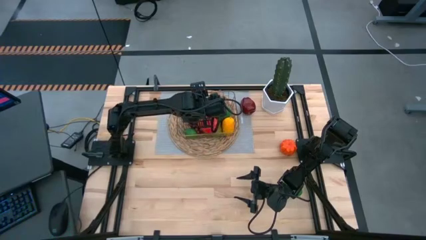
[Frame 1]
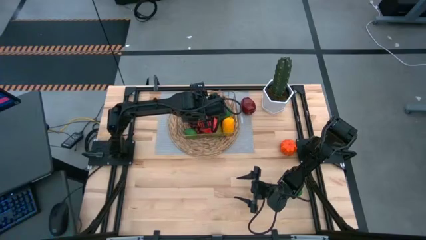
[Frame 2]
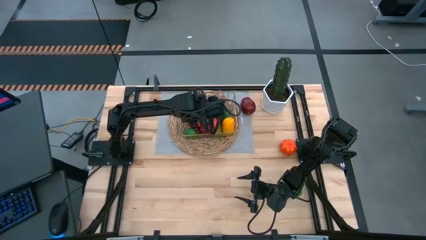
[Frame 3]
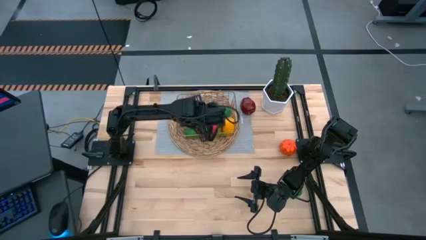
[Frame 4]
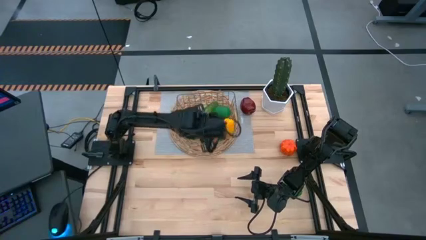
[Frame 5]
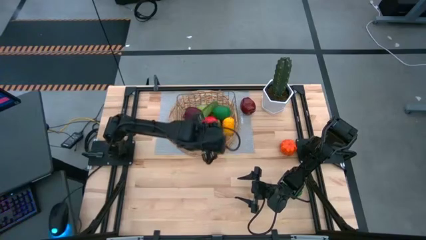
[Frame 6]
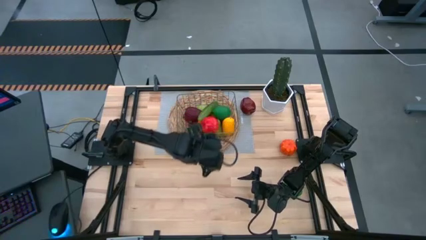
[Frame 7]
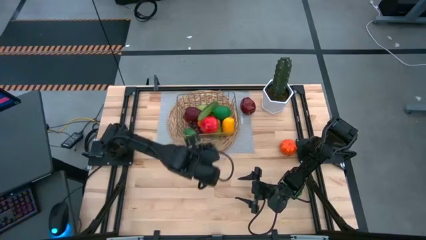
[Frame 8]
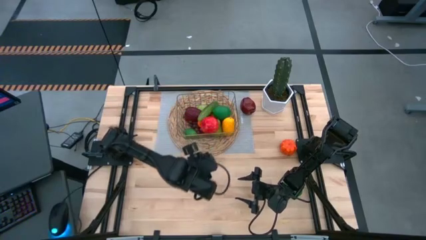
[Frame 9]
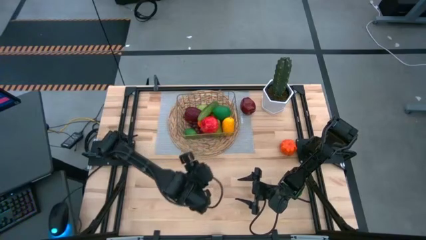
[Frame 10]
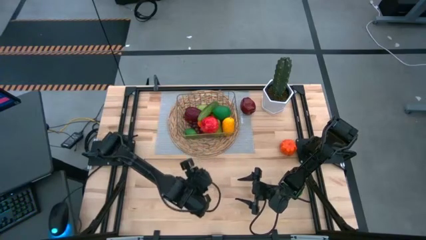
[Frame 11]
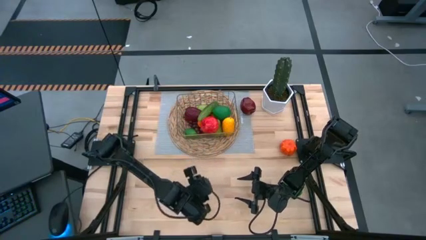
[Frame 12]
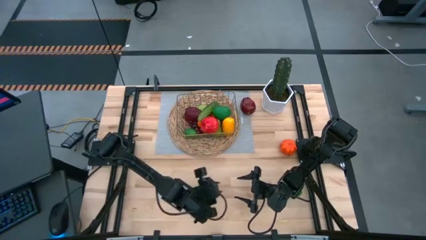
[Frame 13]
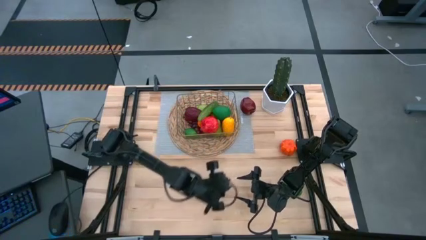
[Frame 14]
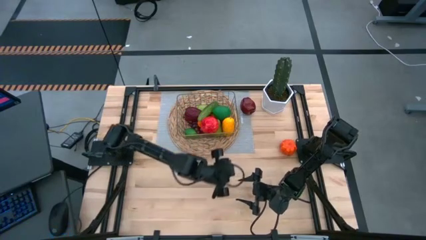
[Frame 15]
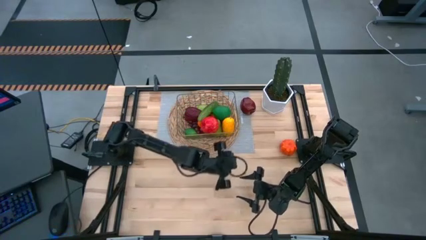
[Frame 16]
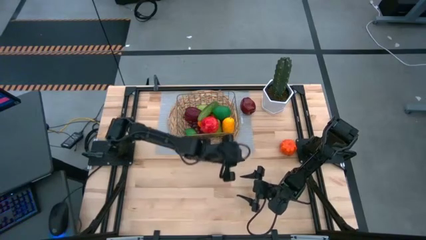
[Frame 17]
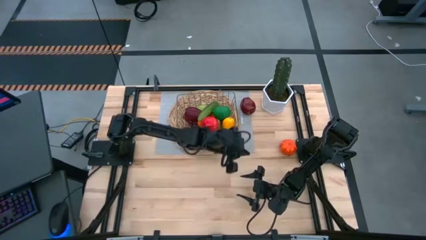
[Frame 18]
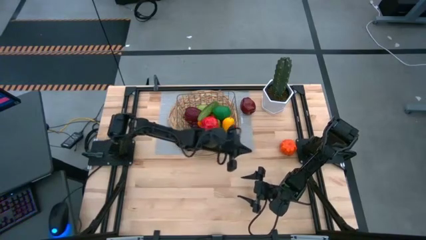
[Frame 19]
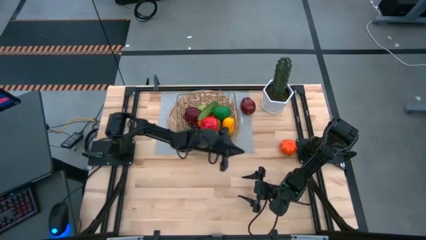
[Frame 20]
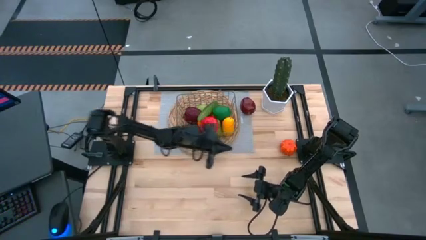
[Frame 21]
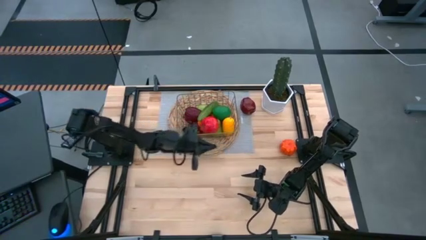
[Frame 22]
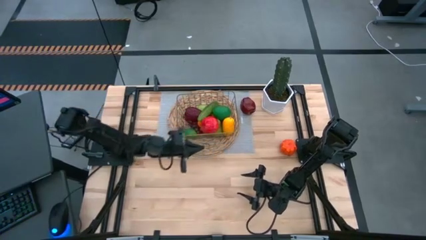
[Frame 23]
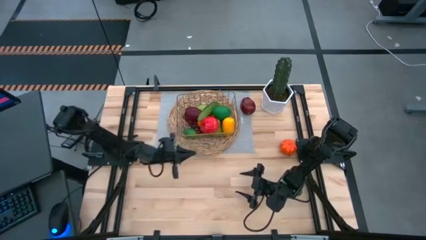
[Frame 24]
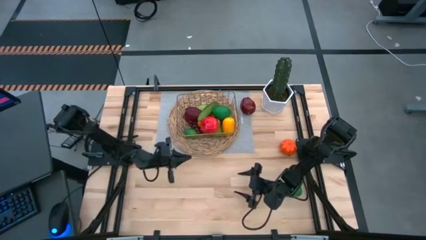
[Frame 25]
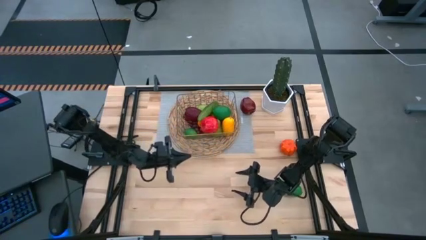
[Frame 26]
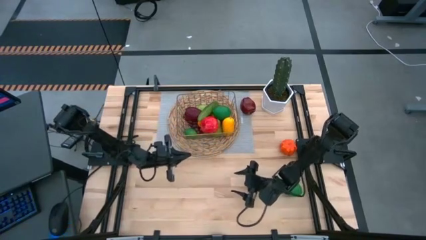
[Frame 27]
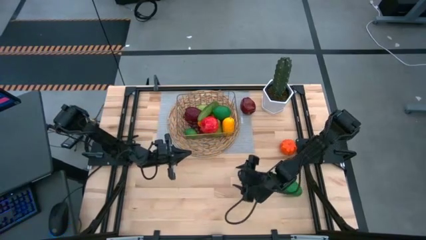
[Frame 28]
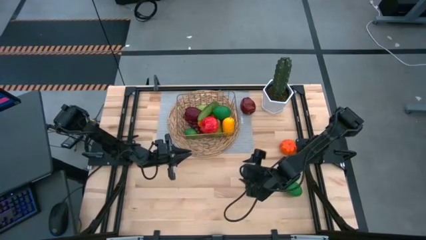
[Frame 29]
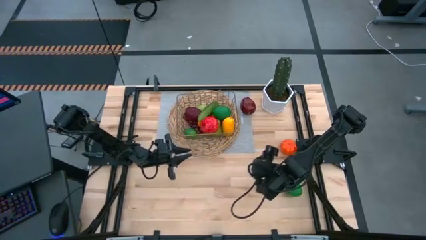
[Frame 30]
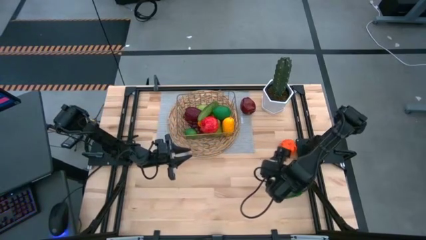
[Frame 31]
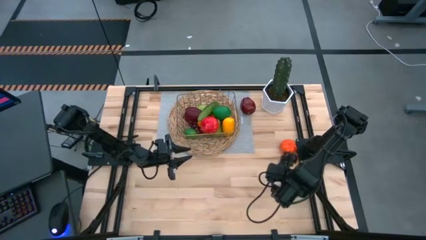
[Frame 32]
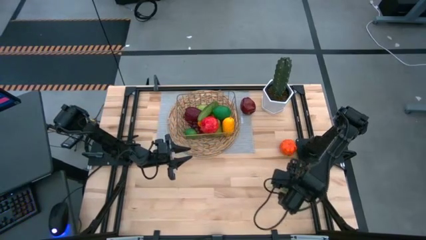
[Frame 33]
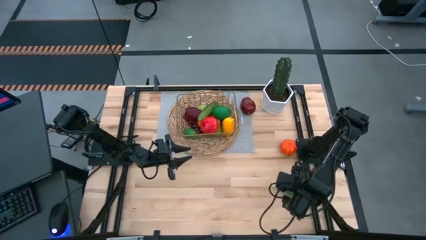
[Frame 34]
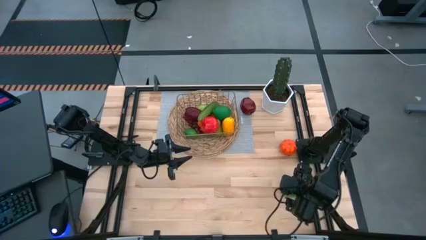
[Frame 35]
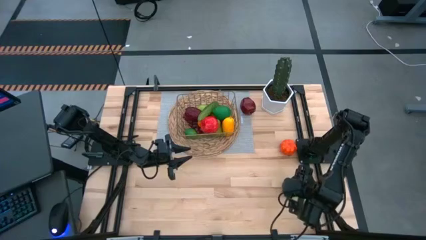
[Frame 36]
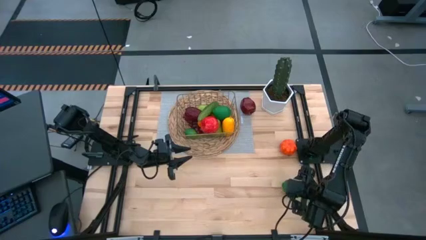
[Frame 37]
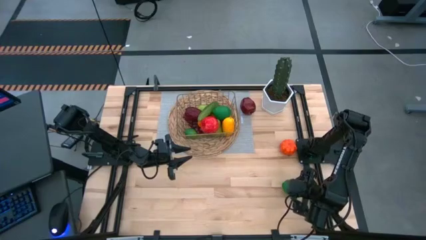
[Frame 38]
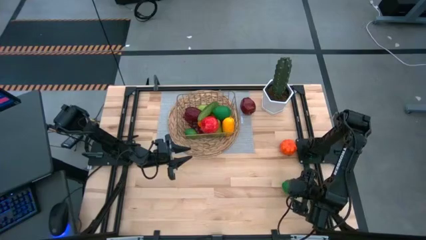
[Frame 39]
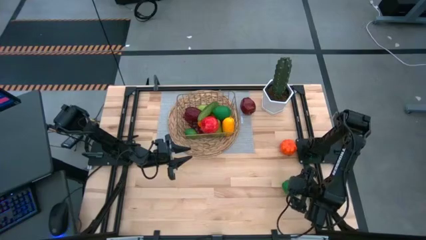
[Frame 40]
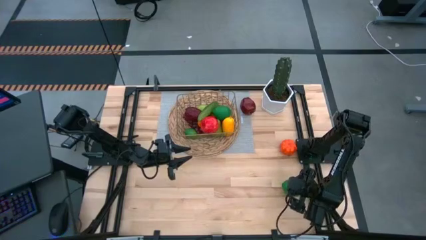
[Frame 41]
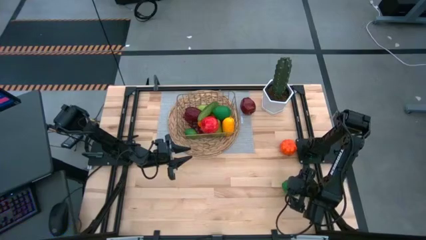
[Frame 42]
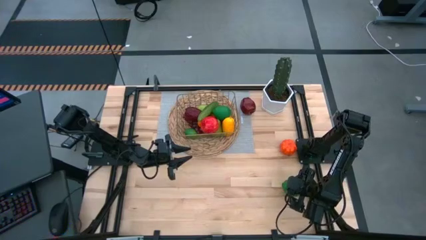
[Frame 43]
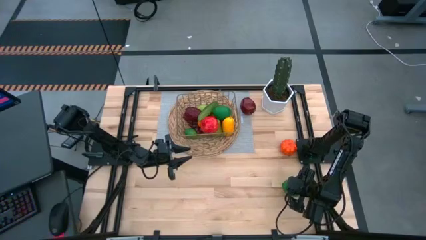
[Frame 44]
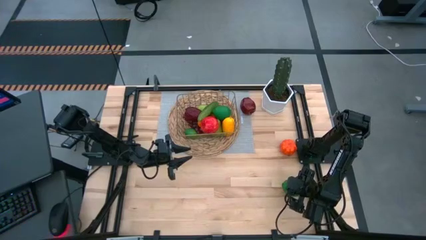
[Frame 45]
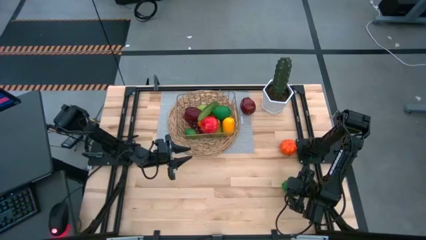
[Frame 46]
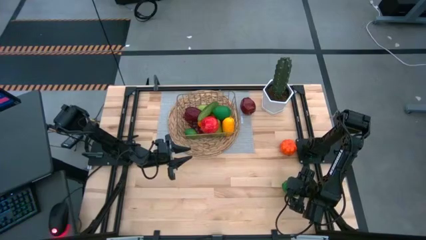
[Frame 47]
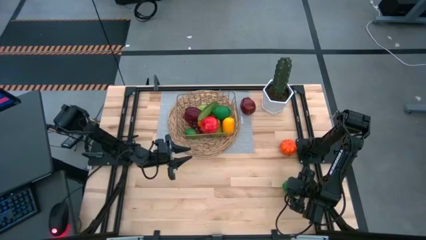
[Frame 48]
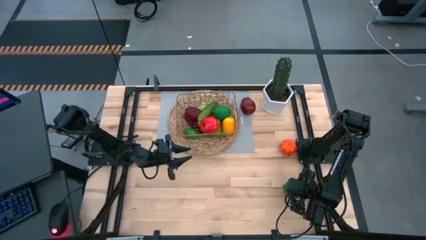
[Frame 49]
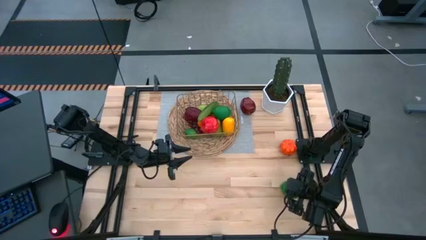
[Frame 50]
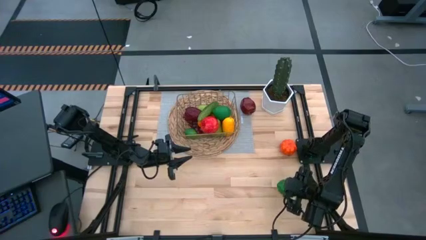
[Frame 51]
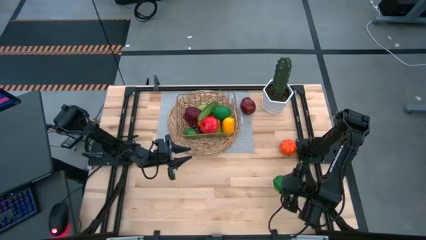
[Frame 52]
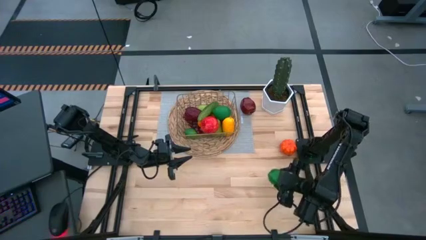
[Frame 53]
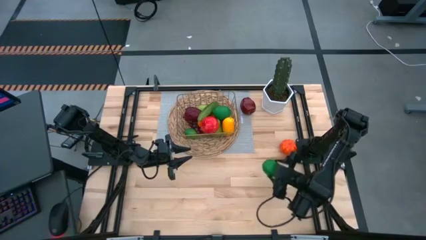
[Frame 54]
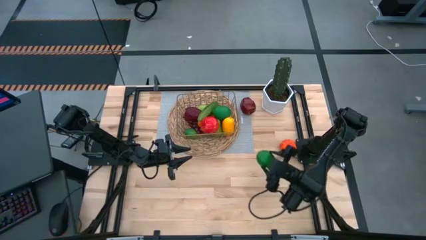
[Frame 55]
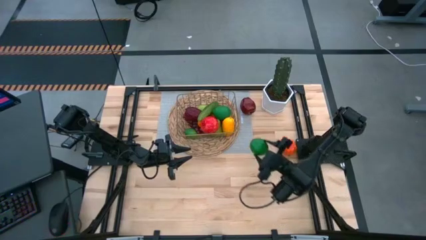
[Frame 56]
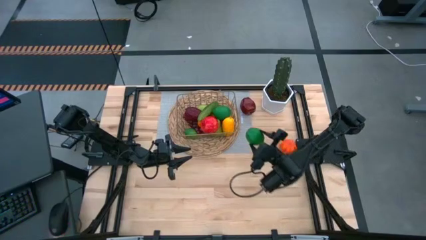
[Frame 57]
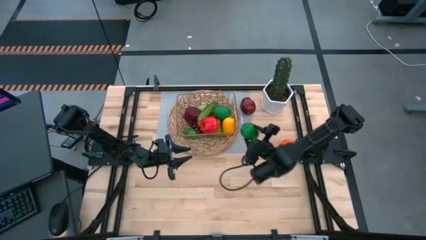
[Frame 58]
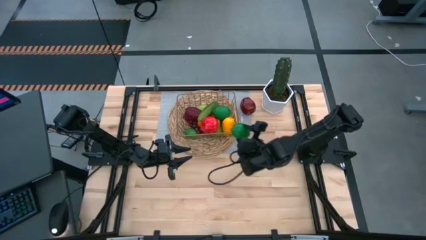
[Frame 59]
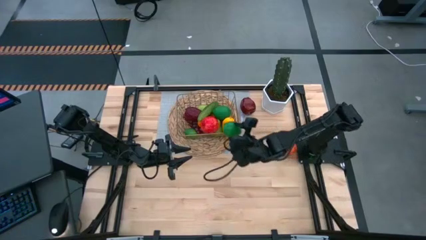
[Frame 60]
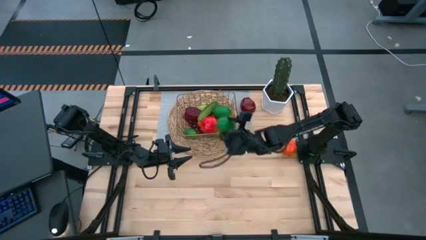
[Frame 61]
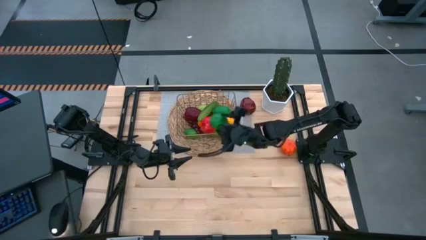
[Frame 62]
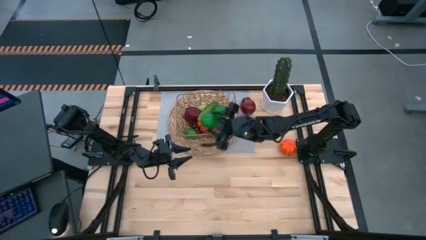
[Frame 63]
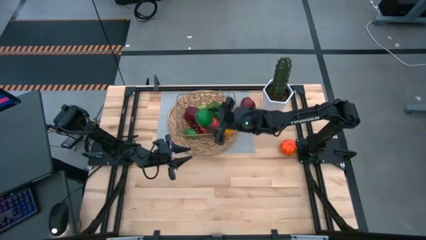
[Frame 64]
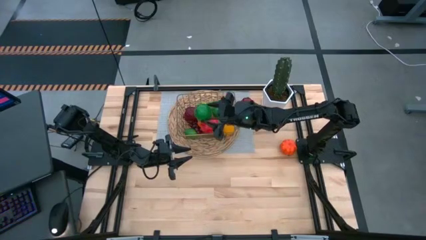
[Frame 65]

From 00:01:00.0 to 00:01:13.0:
Task: Build produce basket
Put the green lime into the gold wire basket
